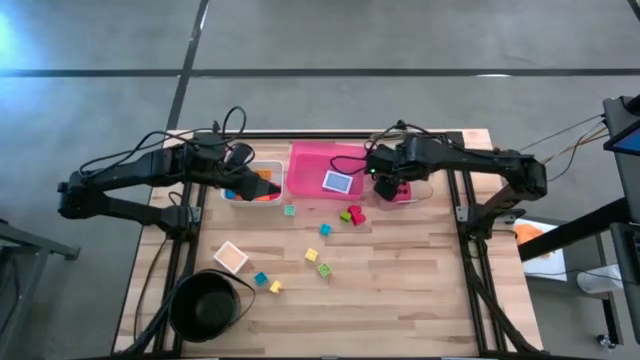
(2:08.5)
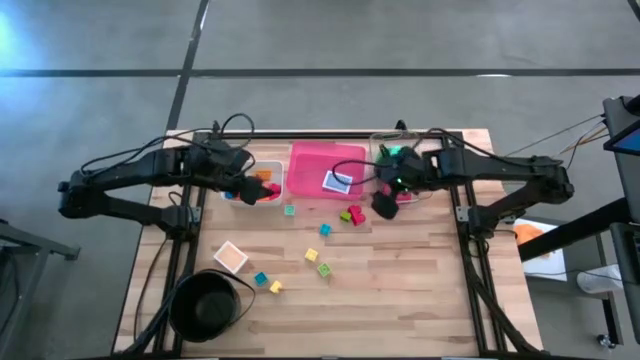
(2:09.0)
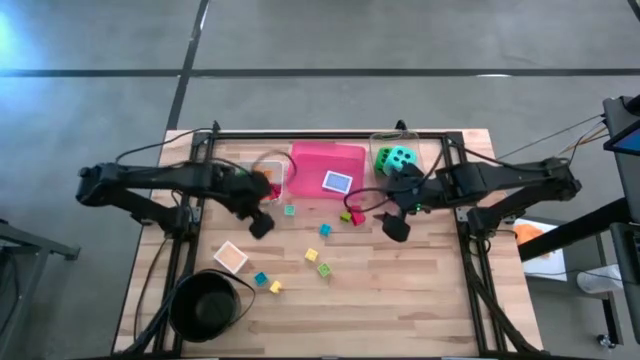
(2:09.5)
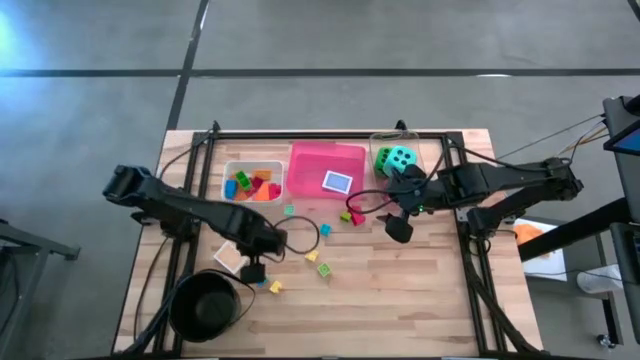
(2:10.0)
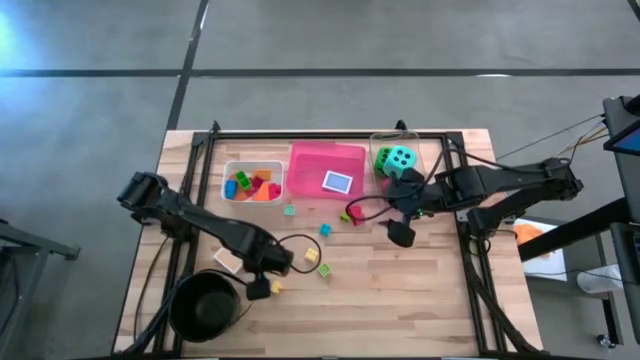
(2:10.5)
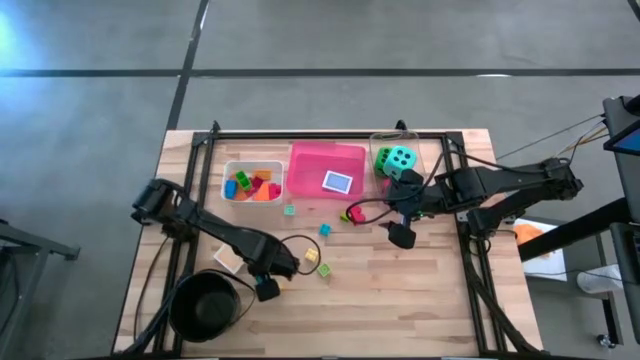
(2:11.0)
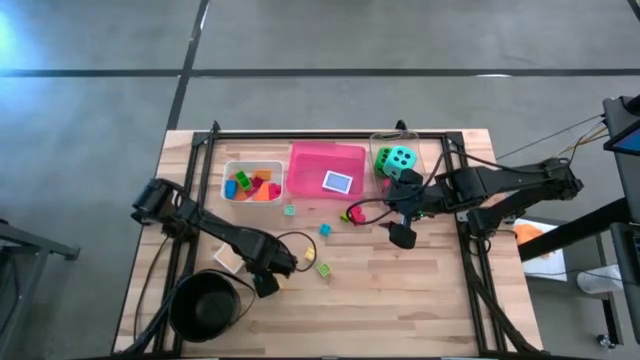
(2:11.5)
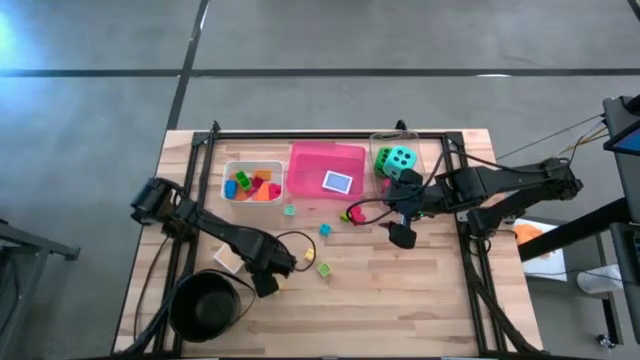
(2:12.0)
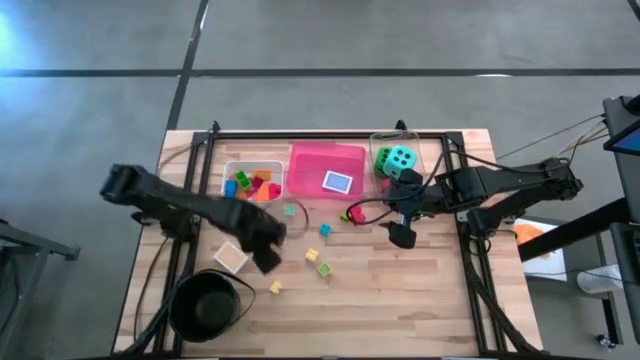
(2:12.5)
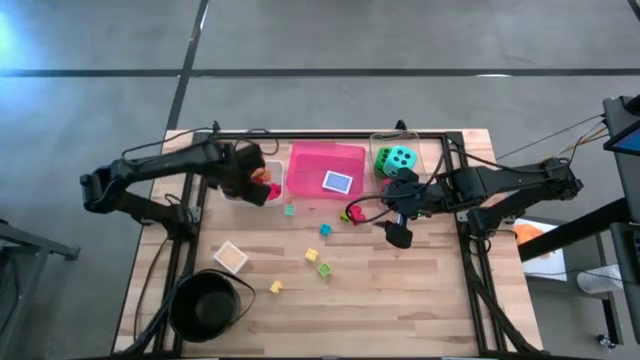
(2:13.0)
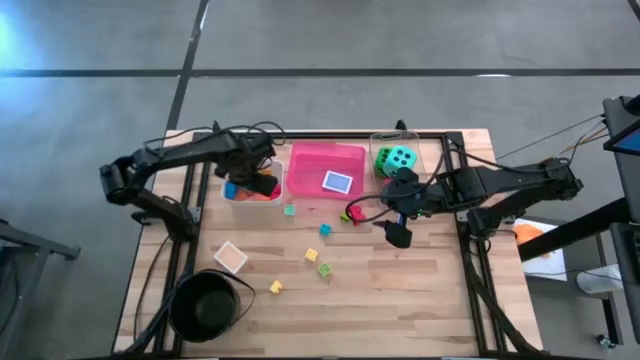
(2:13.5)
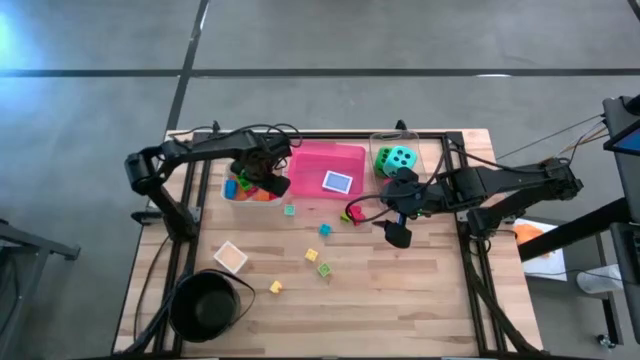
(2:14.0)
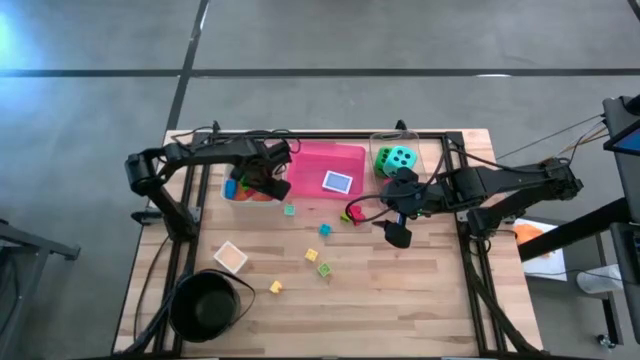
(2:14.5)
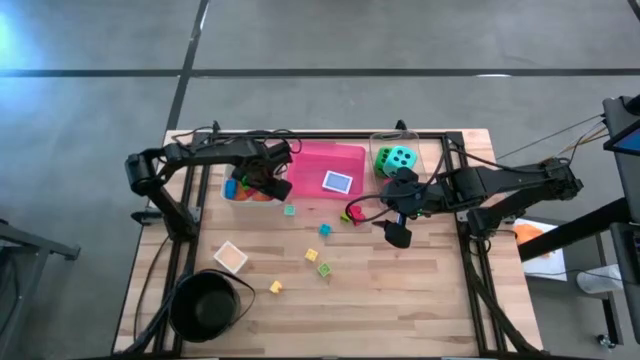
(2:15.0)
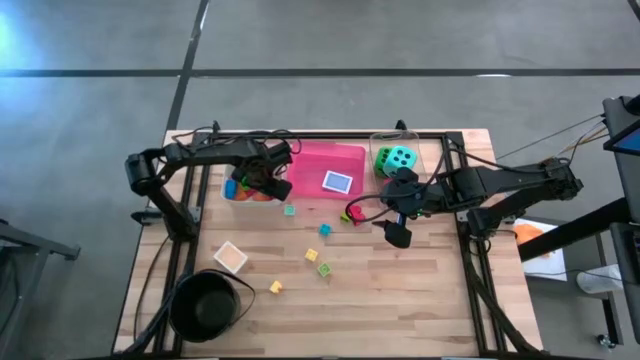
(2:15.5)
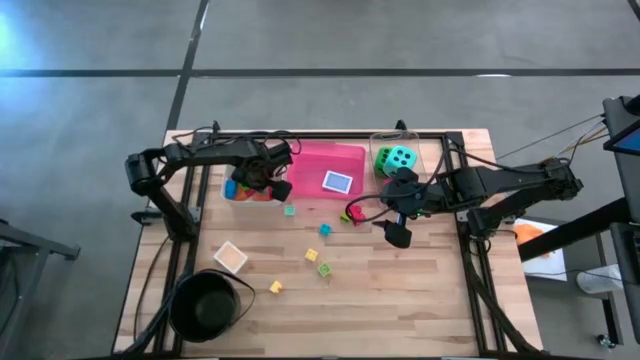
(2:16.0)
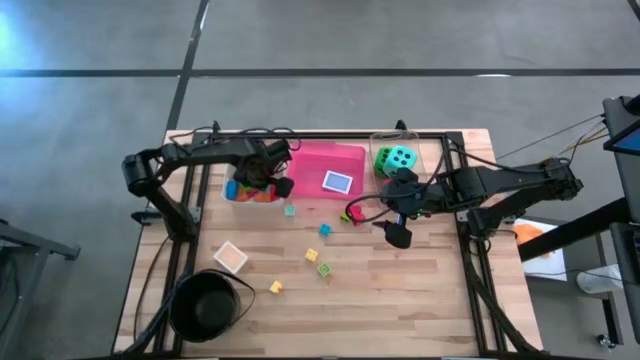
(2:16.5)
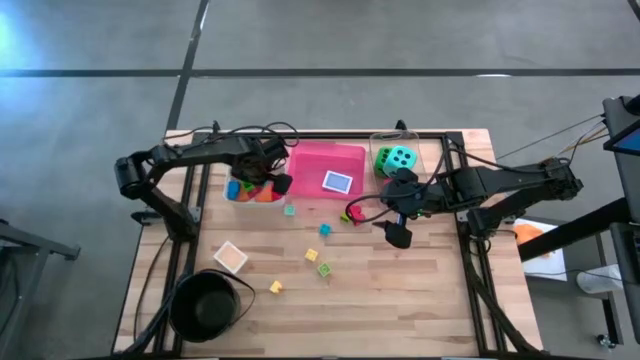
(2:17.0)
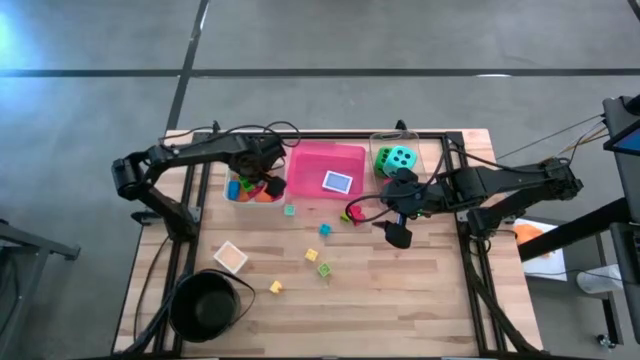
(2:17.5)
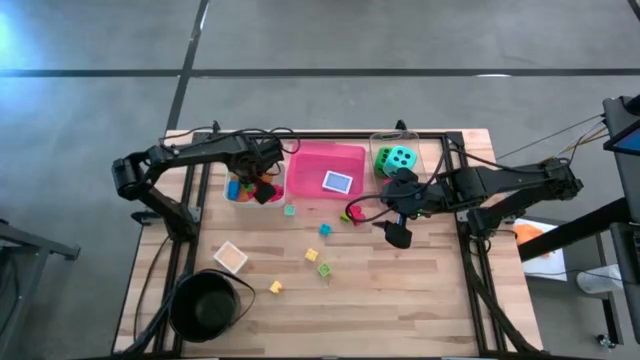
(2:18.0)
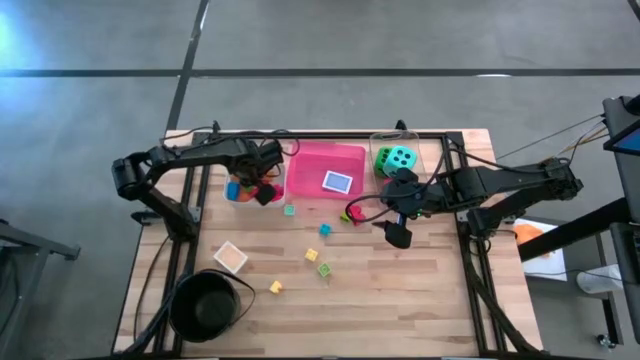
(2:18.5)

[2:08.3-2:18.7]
Task: Pick & Place Toys
Put the blue game piece into the white bin

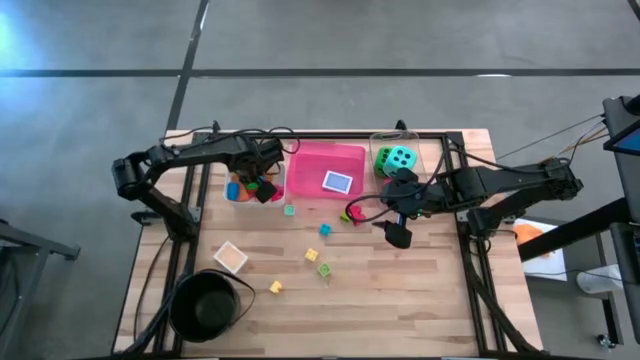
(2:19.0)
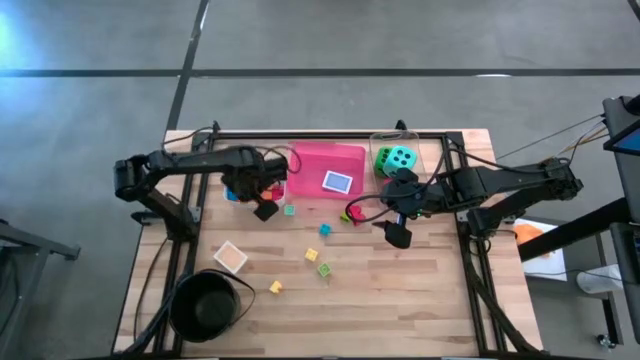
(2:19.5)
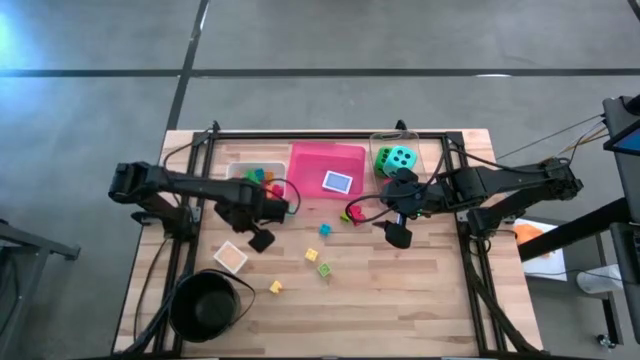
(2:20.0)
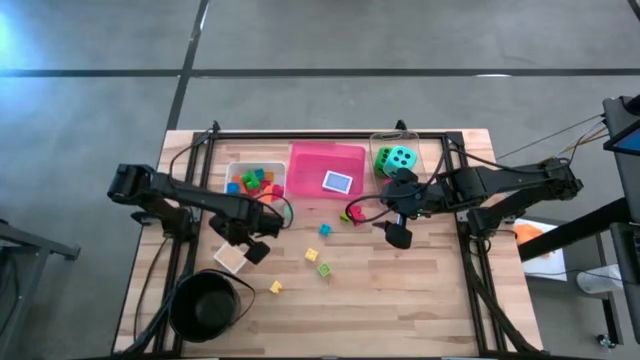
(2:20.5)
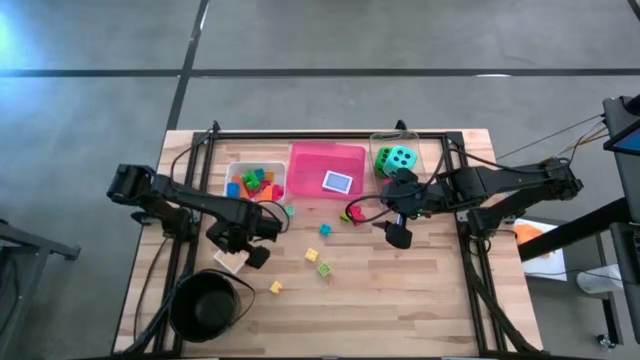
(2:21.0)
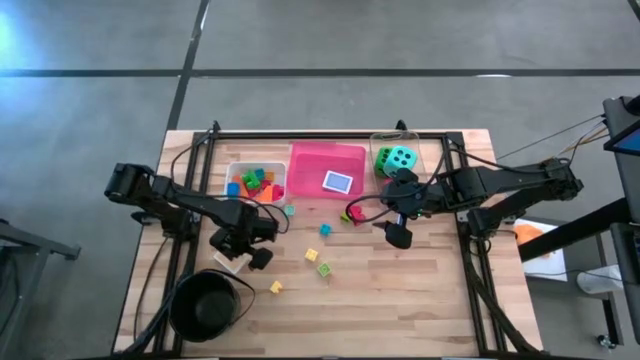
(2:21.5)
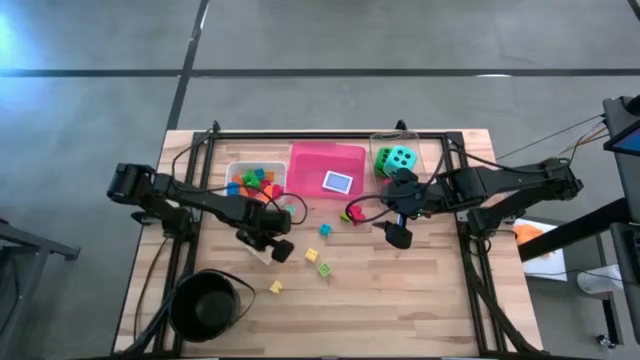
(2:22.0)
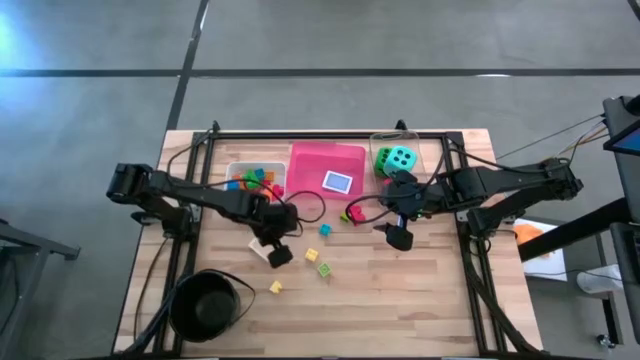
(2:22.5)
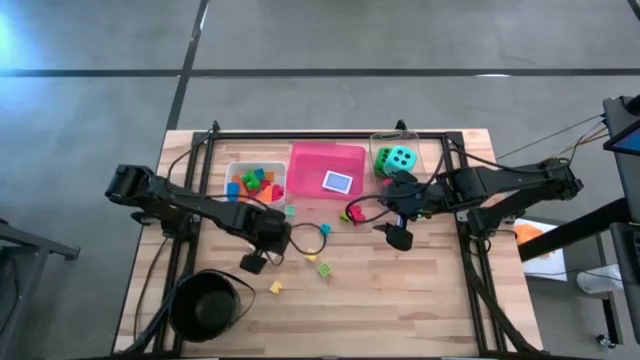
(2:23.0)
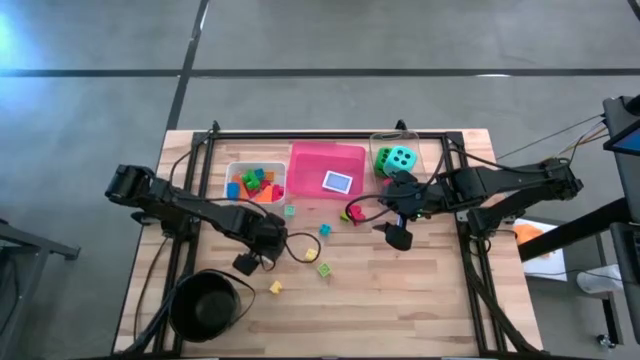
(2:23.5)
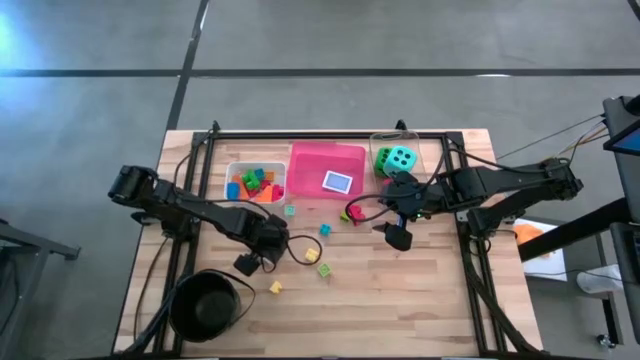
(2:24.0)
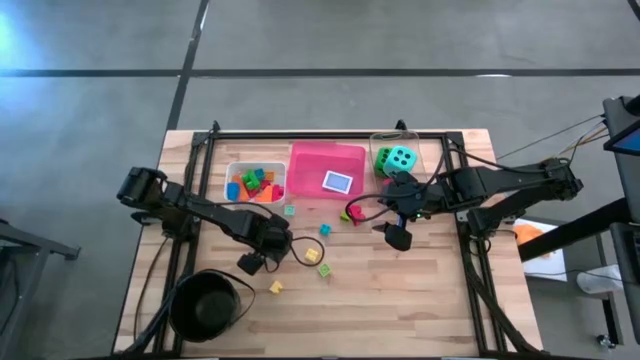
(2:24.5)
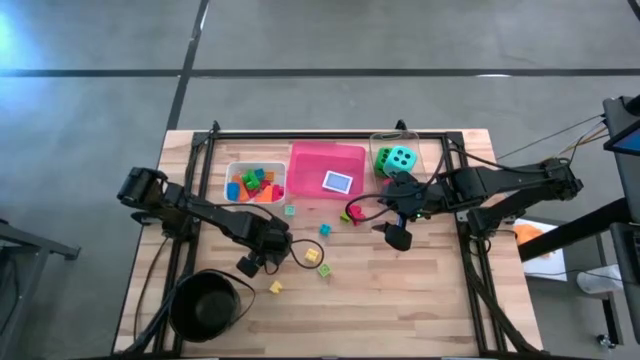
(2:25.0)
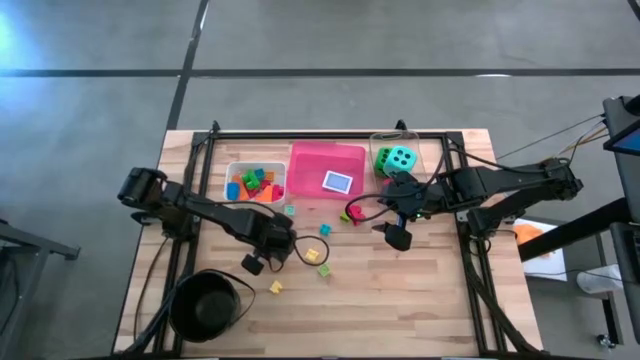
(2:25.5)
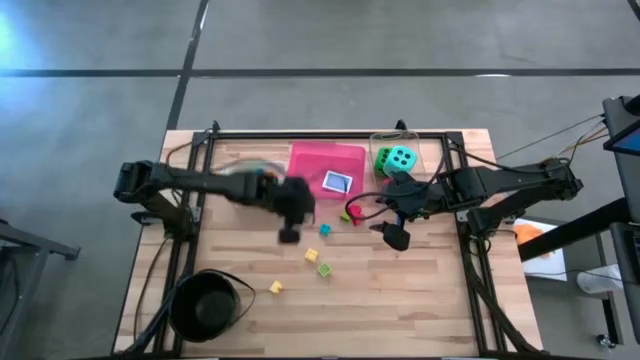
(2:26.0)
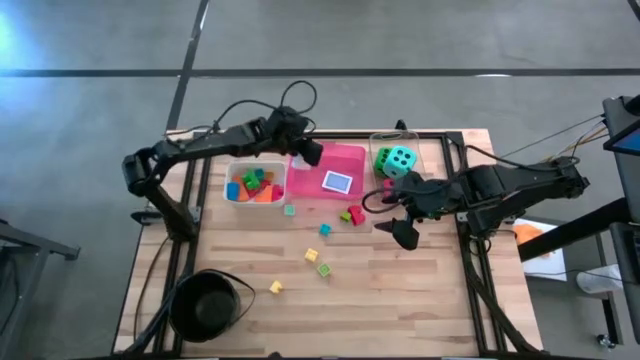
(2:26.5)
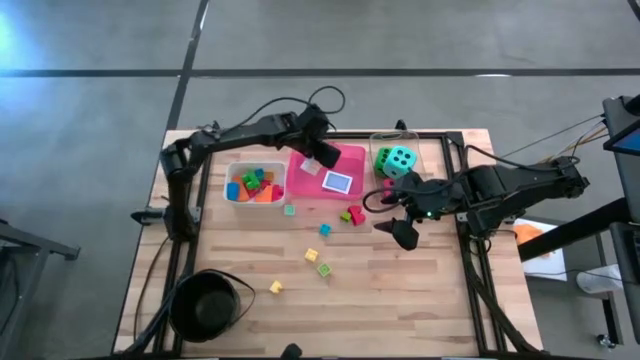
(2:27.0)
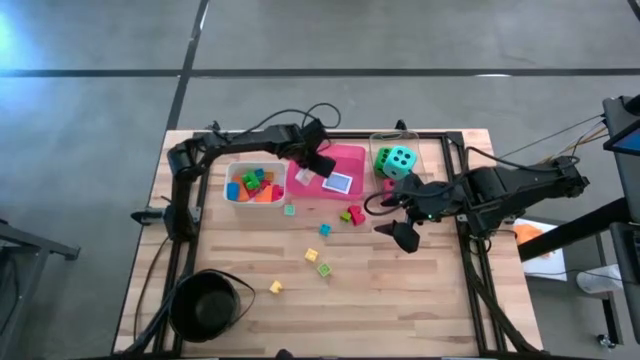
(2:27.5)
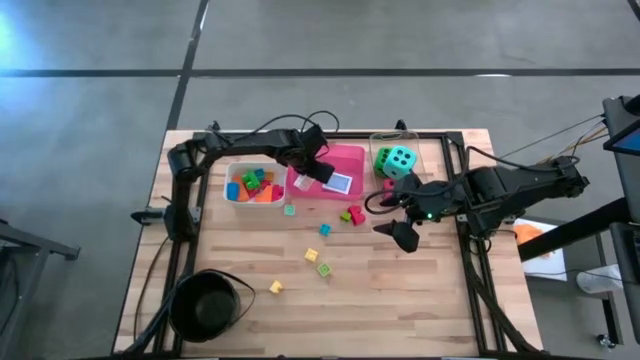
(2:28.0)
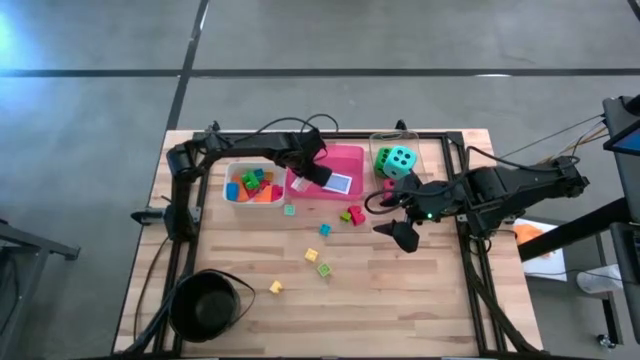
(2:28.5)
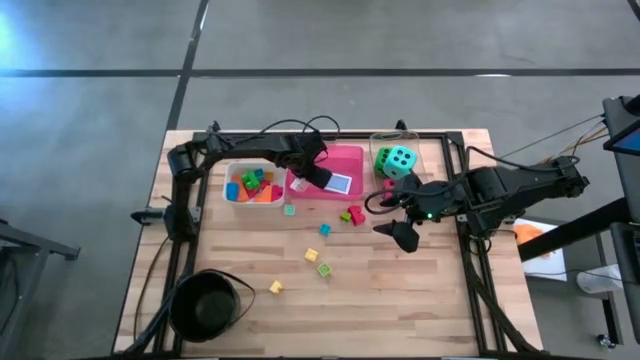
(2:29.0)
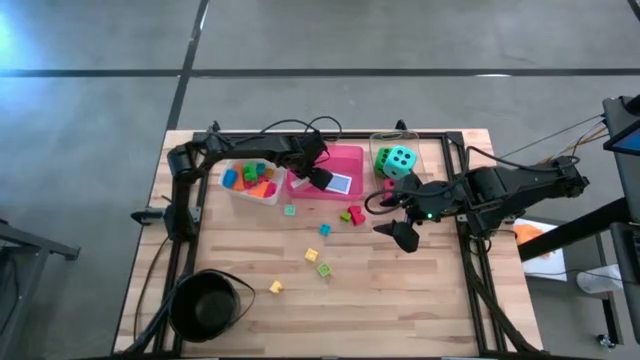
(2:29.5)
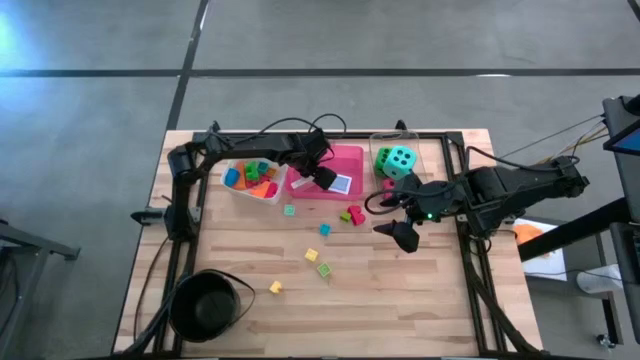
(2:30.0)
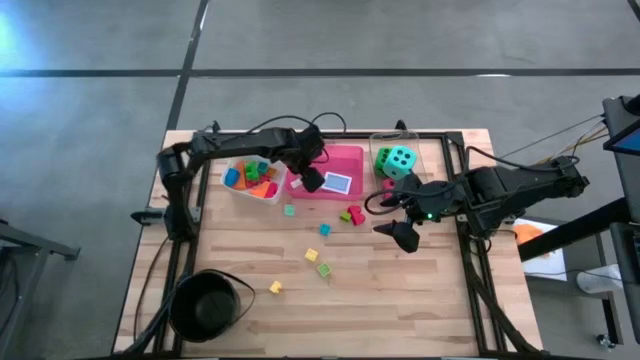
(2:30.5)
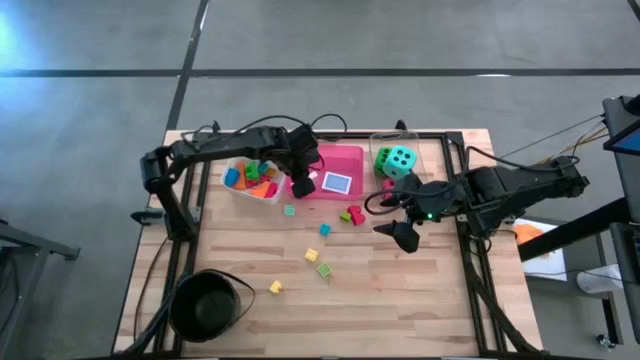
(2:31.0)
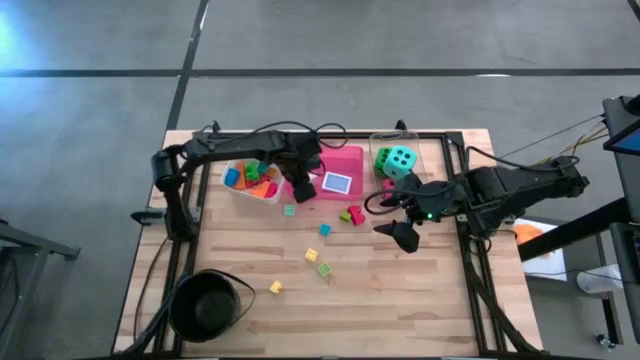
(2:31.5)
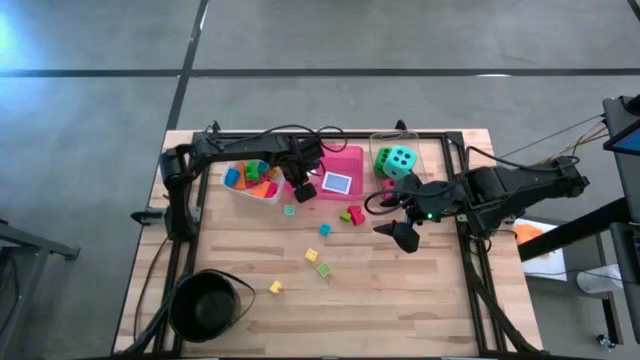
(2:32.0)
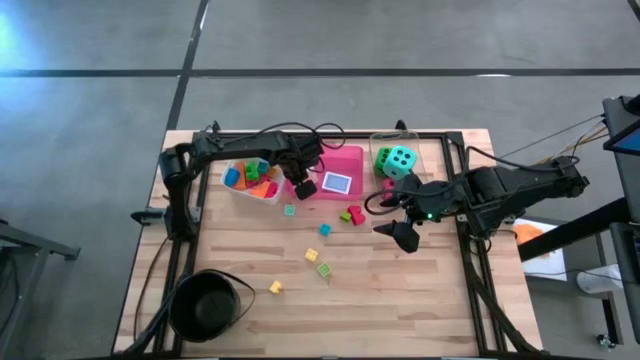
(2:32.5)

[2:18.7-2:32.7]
Put the orange deck of cards into the red bin
